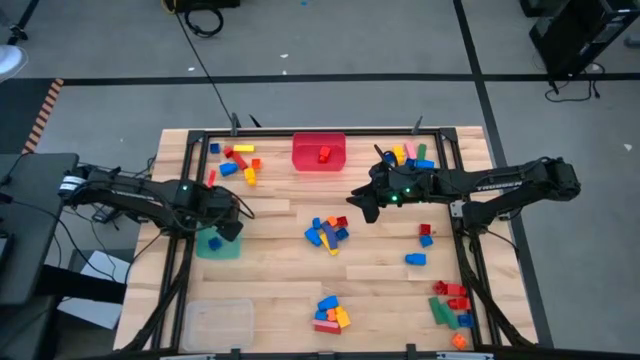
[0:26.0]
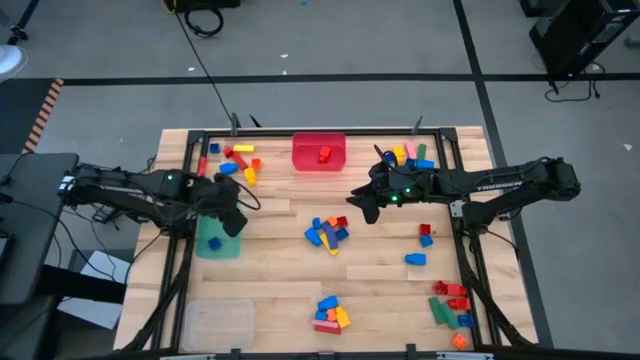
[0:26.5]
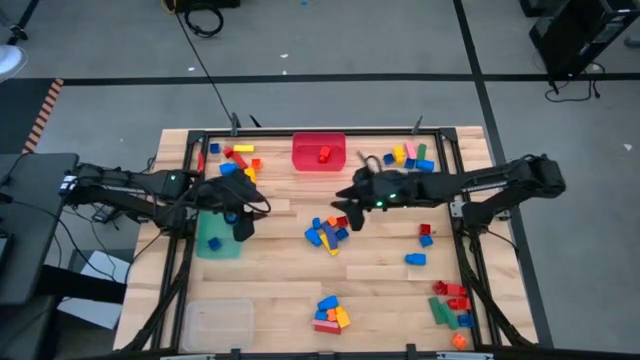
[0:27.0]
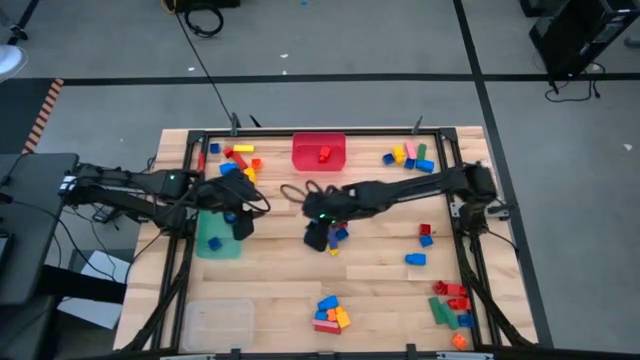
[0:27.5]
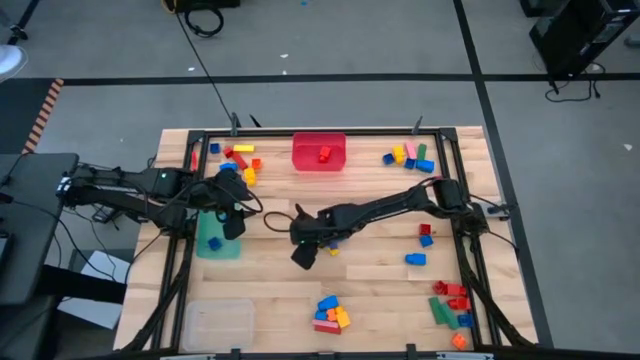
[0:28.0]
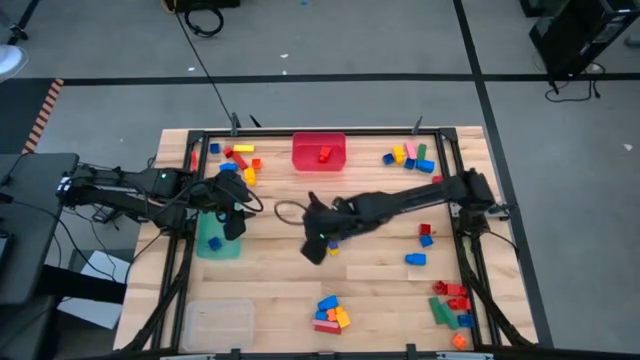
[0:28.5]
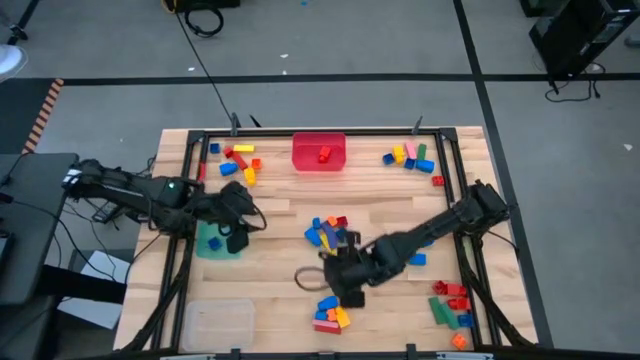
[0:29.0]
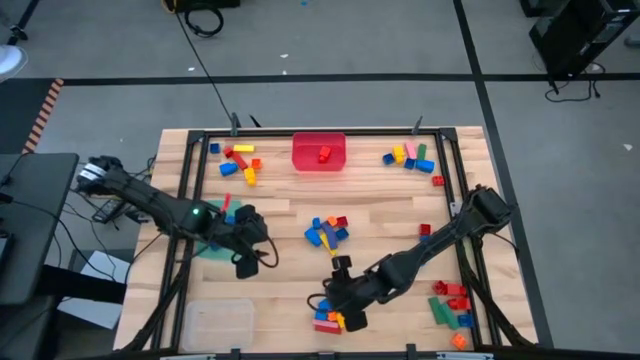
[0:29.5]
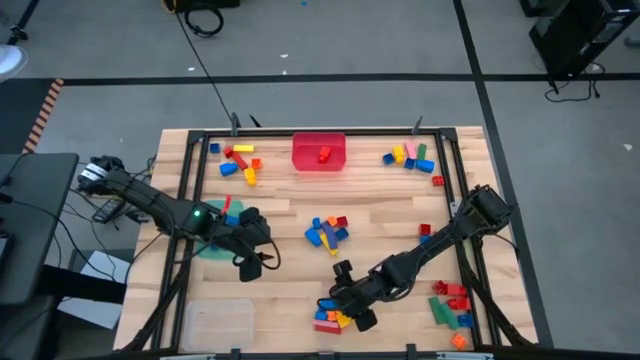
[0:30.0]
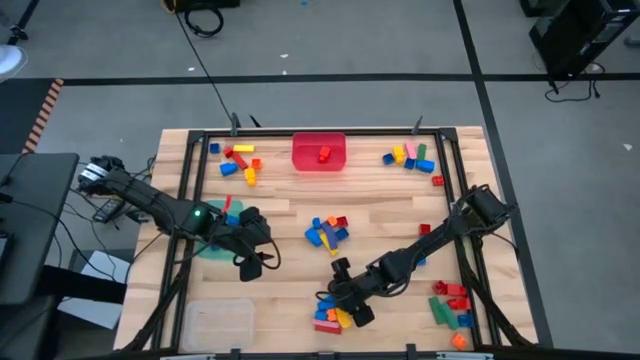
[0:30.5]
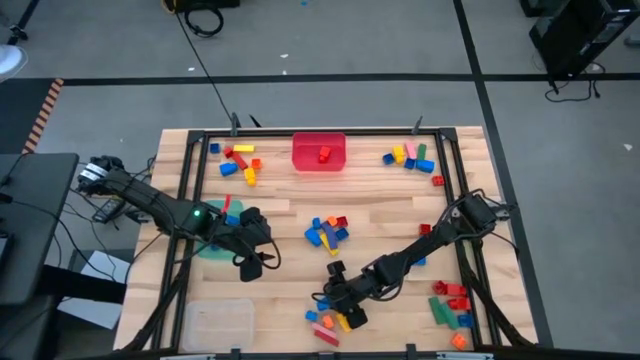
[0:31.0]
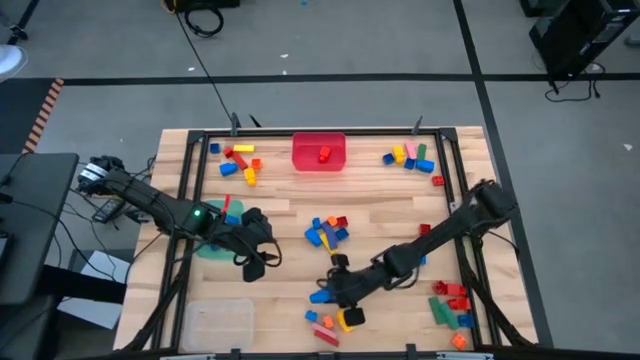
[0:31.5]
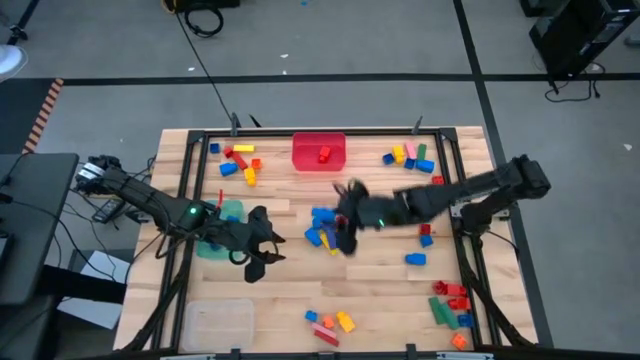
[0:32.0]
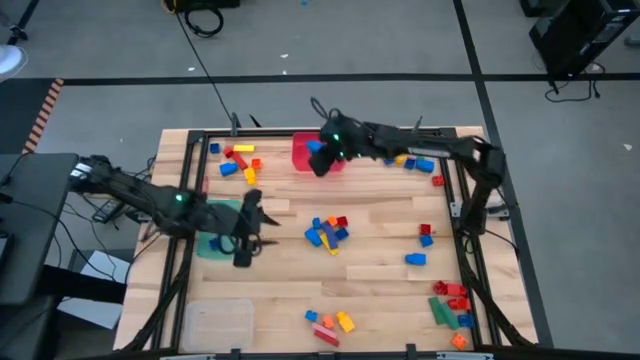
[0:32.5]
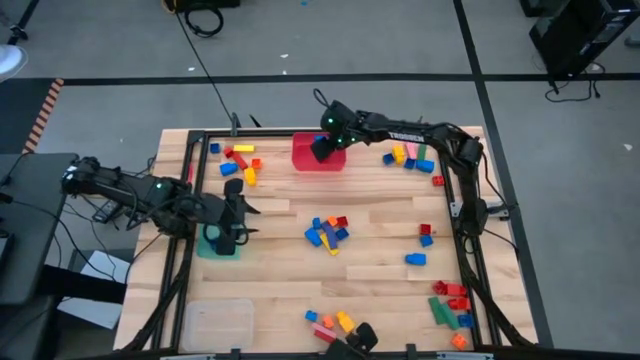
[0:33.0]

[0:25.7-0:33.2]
Task: Sort blocks by size
Put the blue 1 studded building block into the red bin

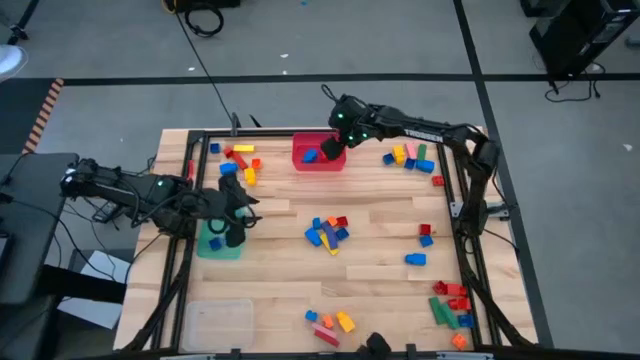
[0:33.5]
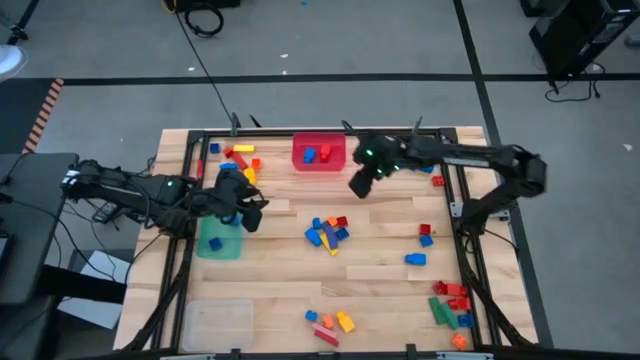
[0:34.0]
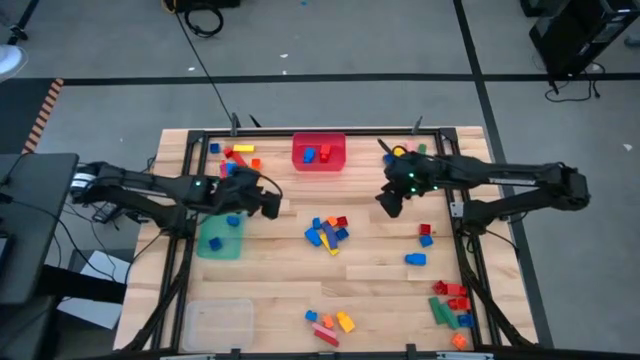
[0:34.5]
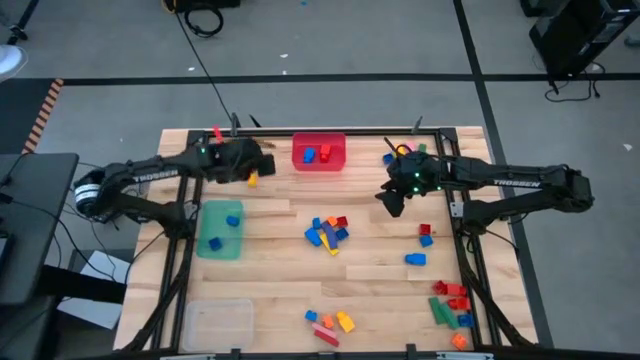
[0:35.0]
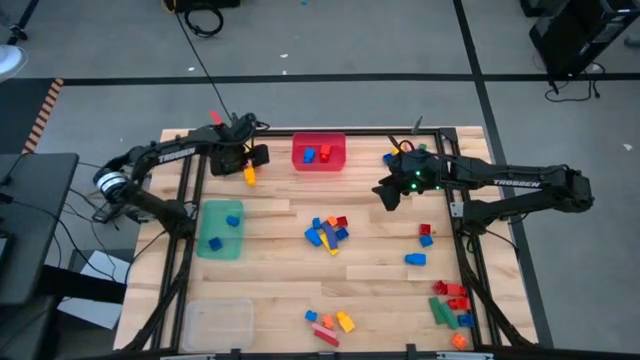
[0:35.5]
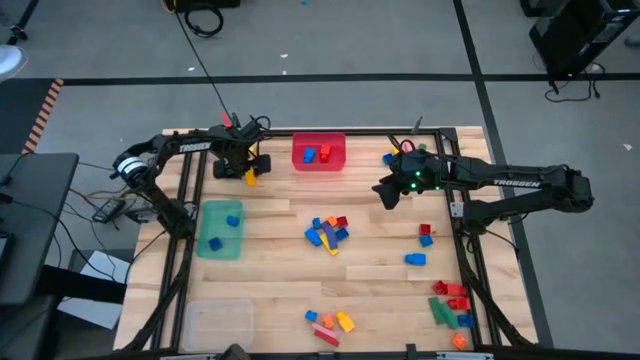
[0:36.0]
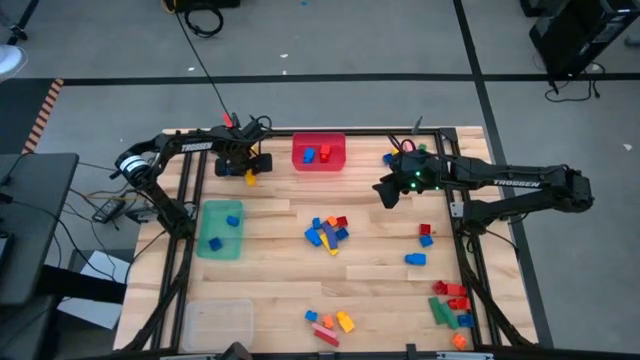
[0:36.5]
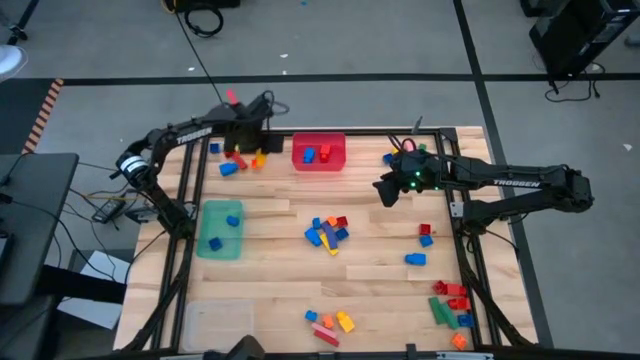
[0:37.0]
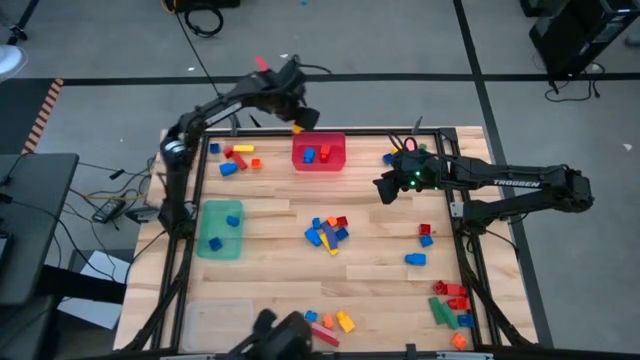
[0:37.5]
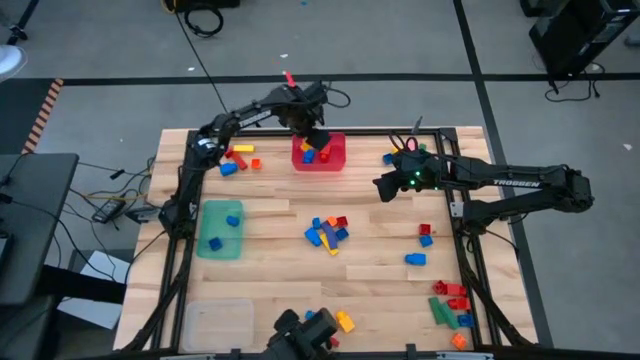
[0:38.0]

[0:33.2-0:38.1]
Put the yellow 1 studded building block into the red bin

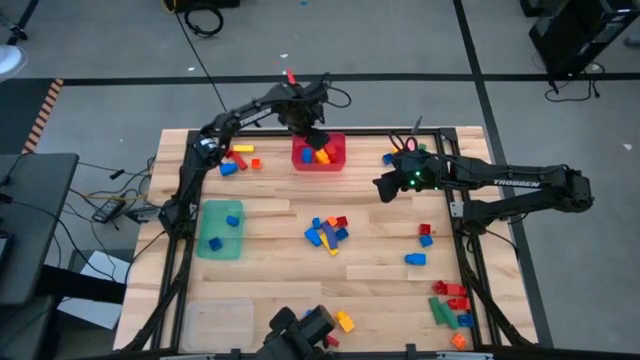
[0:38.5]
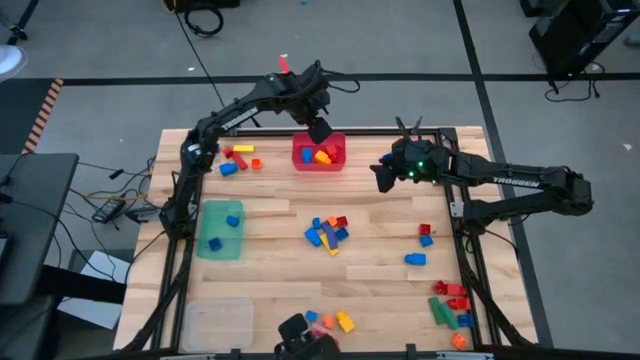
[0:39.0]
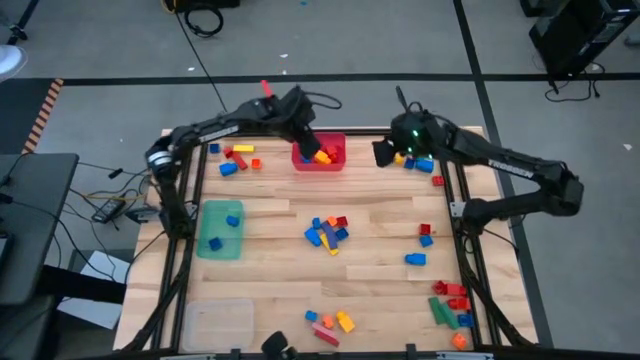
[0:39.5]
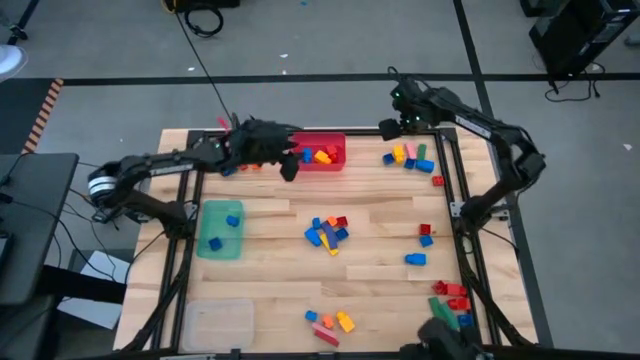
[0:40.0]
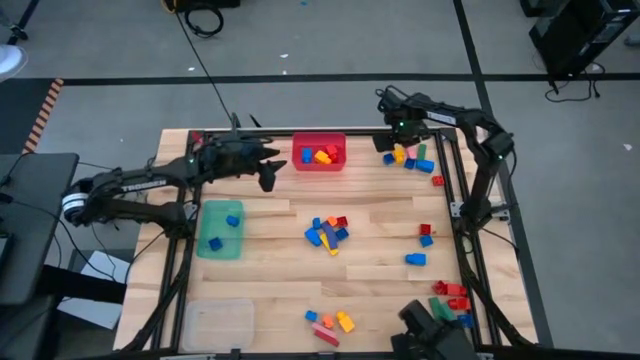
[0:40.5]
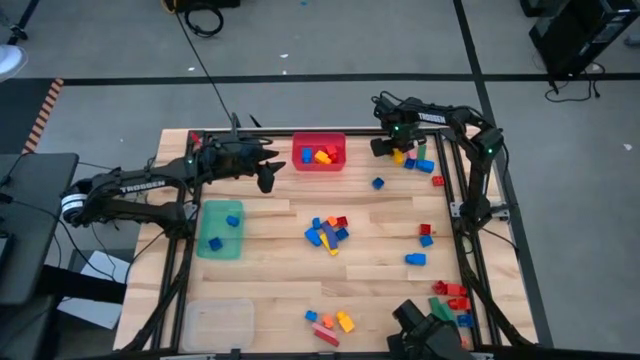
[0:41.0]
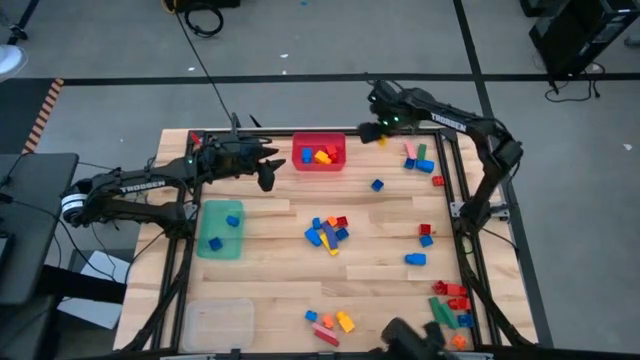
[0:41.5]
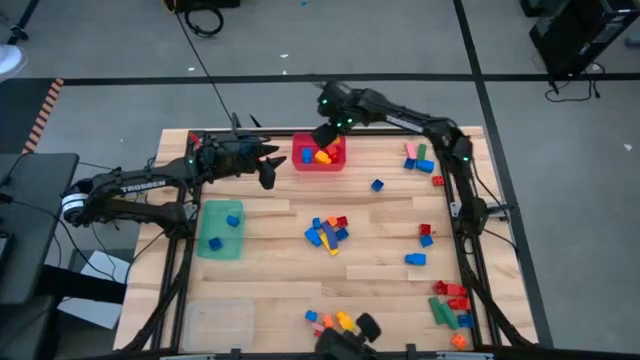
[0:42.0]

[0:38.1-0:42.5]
Put the yellow 1 studded building block into the red bin

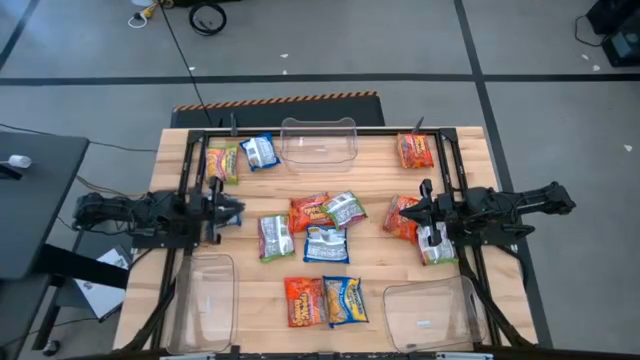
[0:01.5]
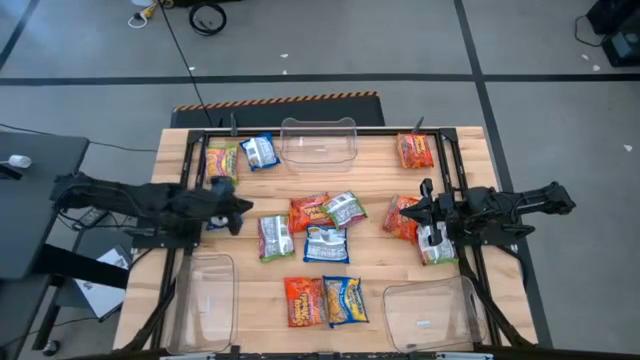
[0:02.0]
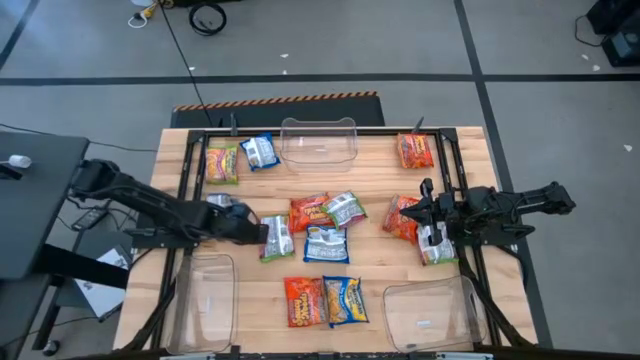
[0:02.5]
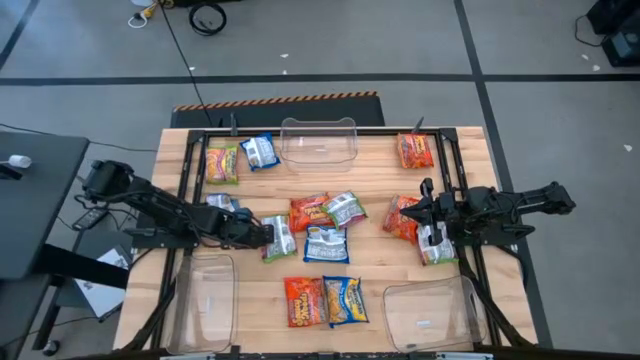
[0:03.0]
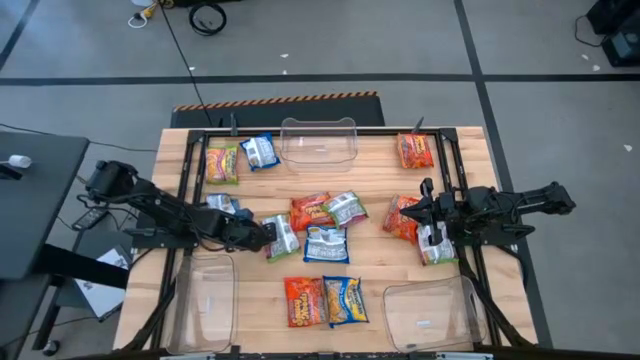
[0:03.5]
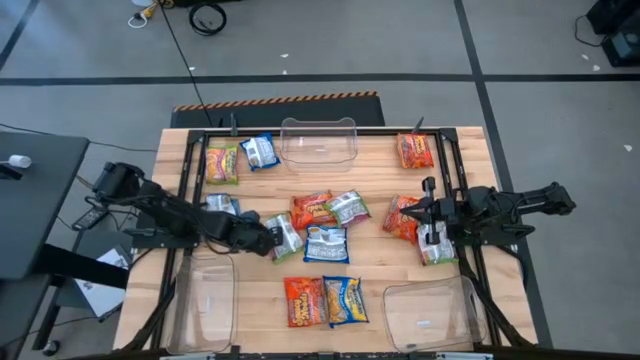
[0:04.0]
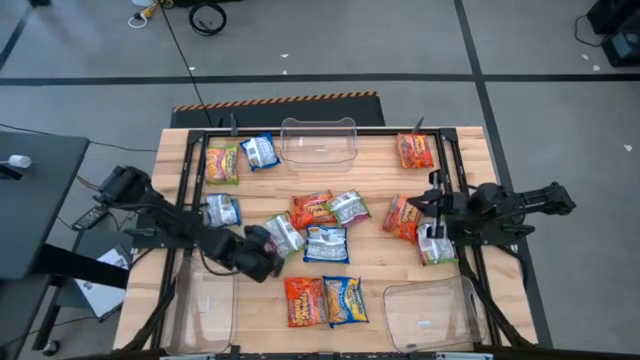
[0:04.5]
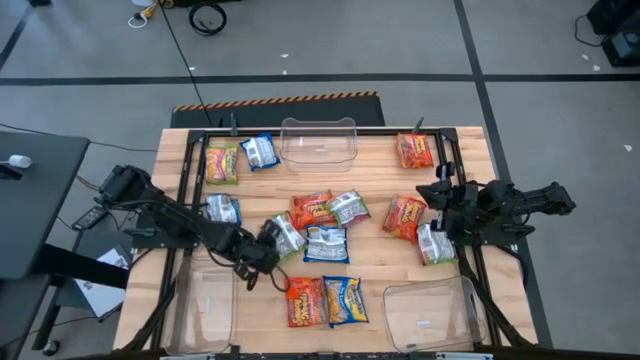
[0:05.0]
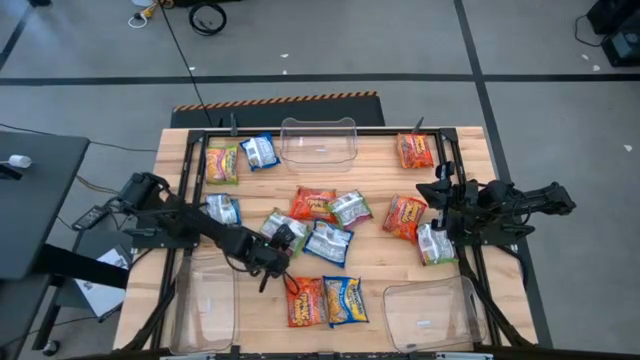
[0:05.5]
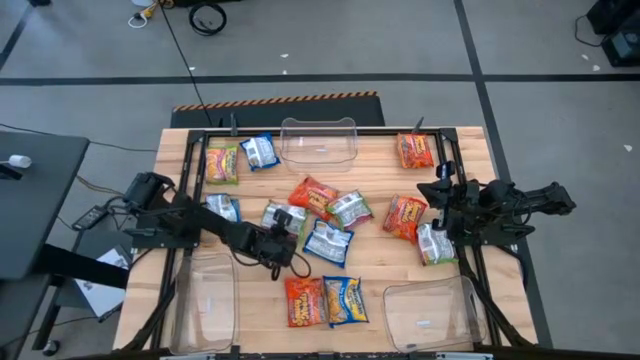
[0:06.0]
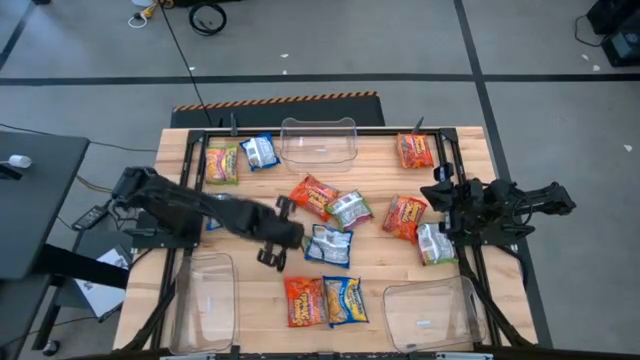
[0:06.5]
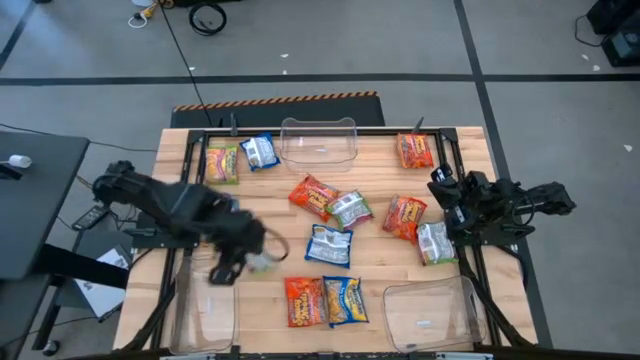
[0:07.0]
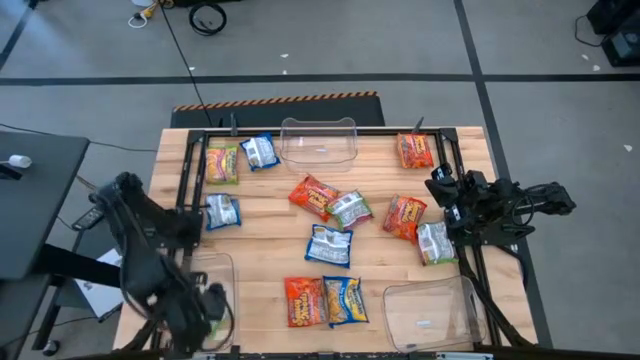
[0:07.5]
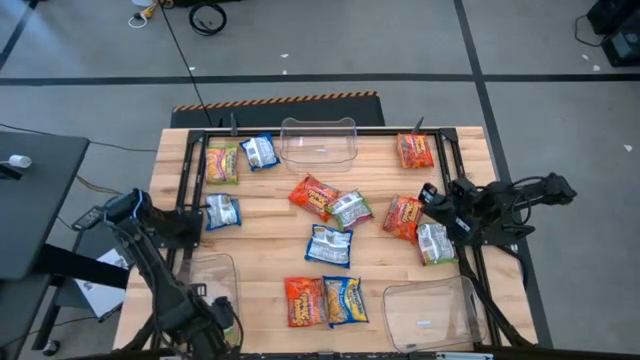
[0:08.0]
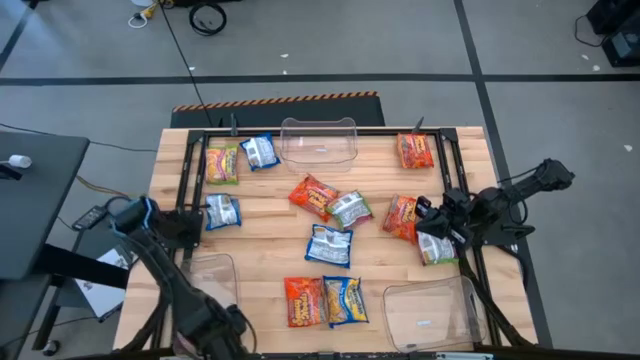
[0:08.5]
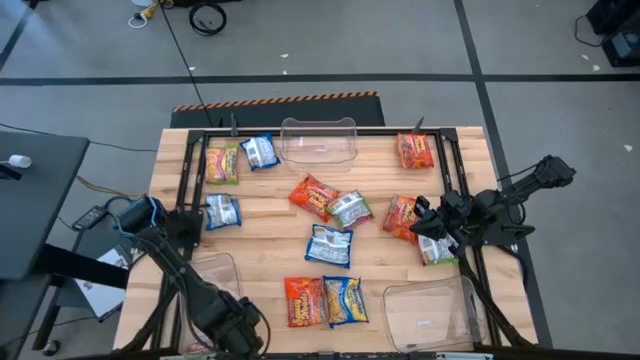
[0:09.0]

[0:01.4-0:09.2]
Task: Sort Maruchan noodles
Put the green noodle pack into the bottom left transparent bin
